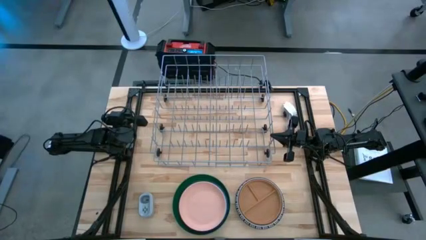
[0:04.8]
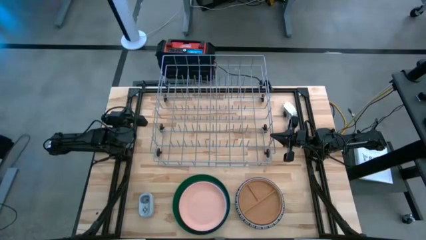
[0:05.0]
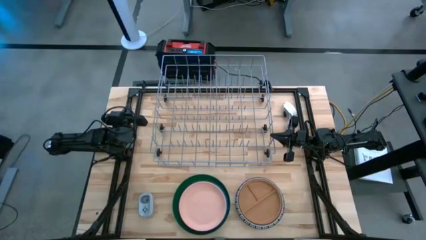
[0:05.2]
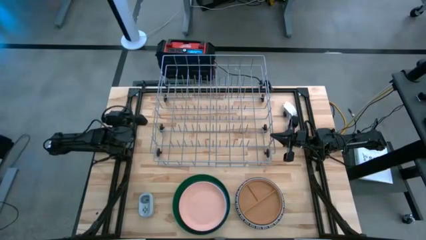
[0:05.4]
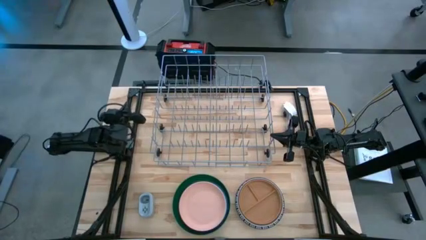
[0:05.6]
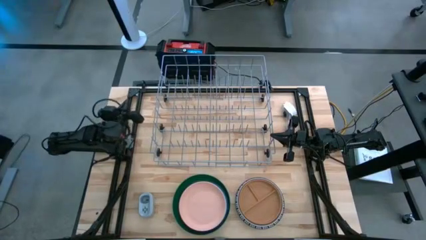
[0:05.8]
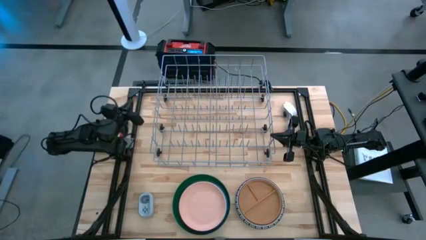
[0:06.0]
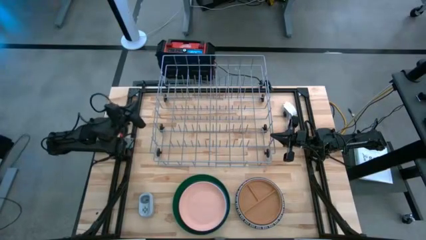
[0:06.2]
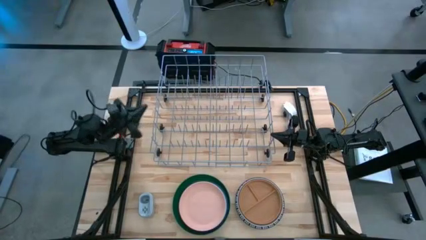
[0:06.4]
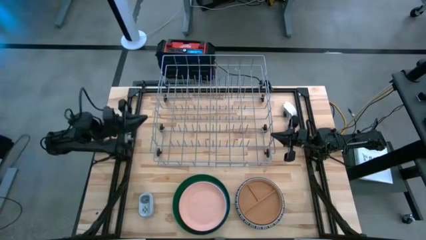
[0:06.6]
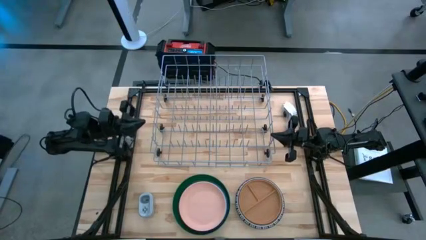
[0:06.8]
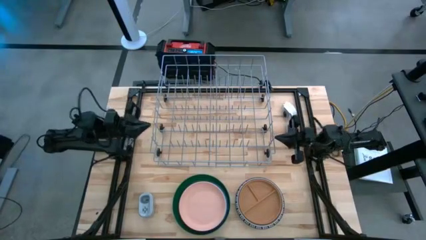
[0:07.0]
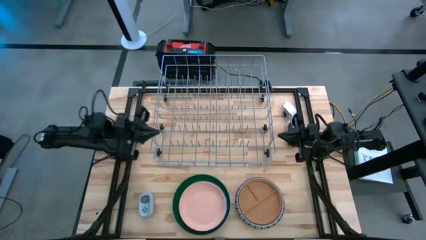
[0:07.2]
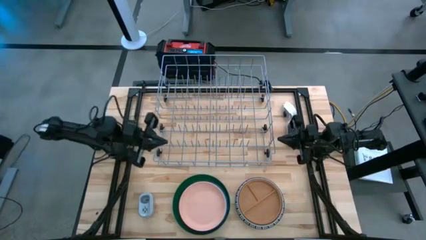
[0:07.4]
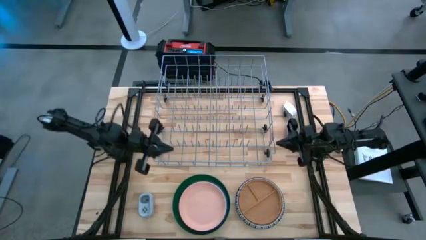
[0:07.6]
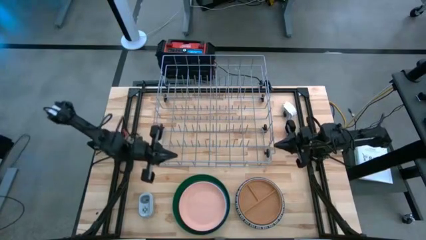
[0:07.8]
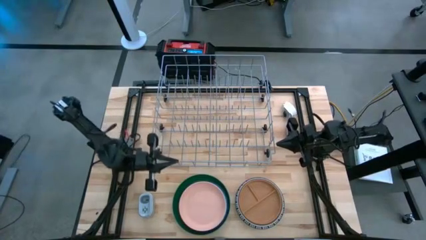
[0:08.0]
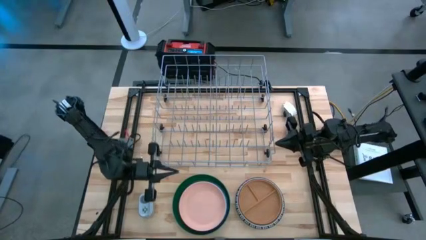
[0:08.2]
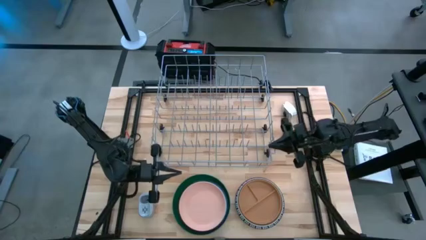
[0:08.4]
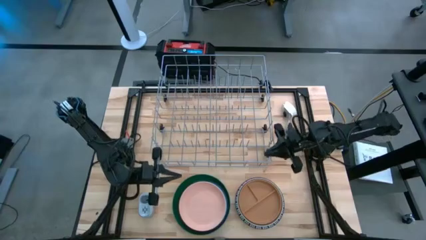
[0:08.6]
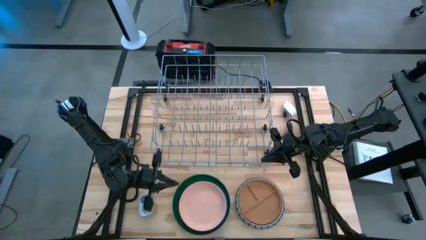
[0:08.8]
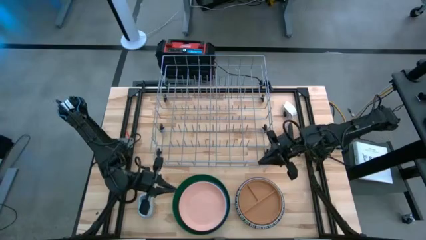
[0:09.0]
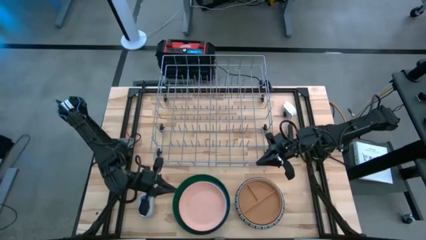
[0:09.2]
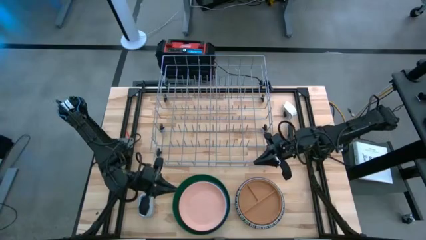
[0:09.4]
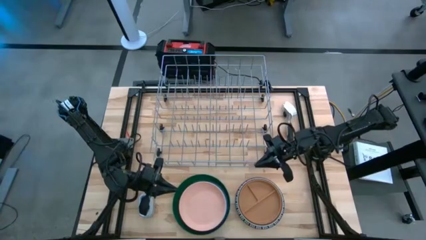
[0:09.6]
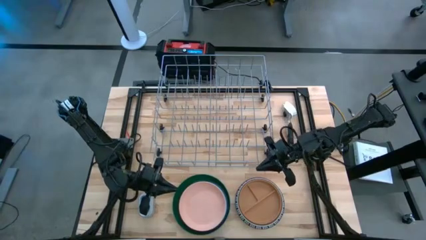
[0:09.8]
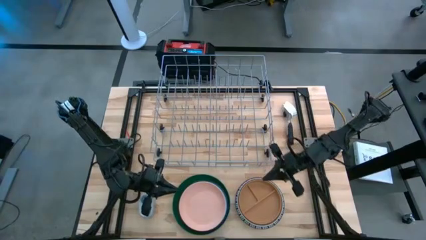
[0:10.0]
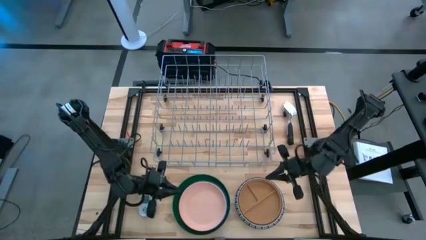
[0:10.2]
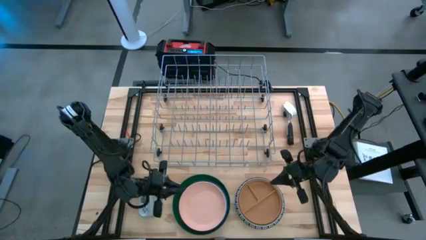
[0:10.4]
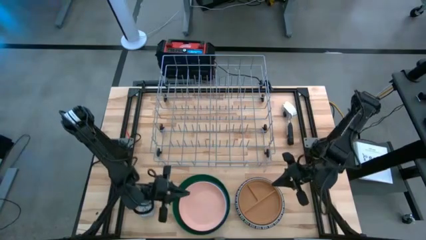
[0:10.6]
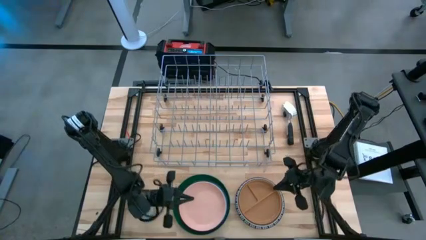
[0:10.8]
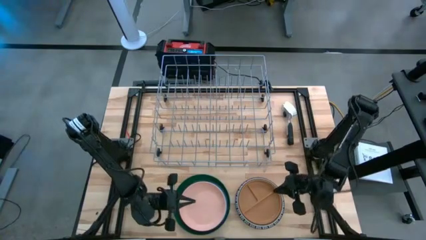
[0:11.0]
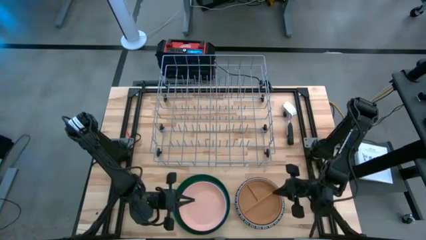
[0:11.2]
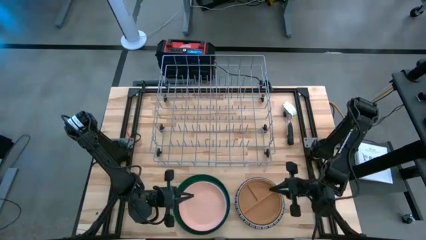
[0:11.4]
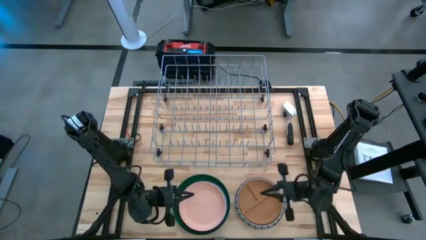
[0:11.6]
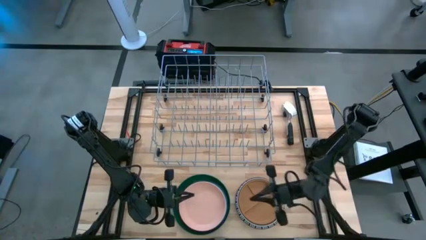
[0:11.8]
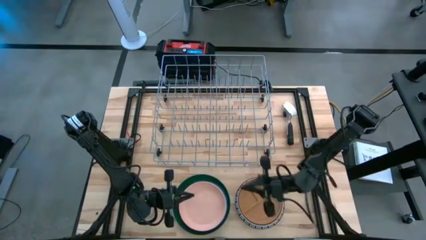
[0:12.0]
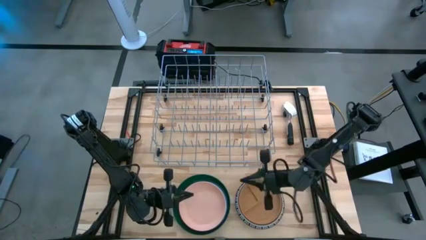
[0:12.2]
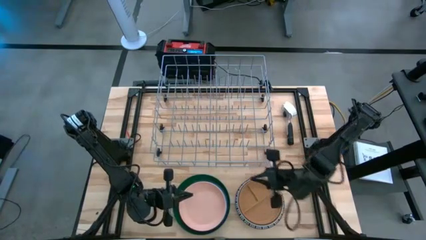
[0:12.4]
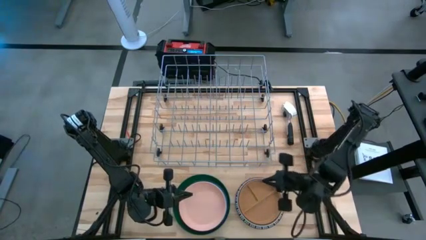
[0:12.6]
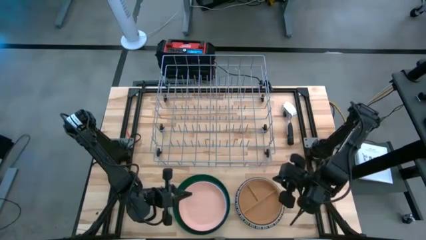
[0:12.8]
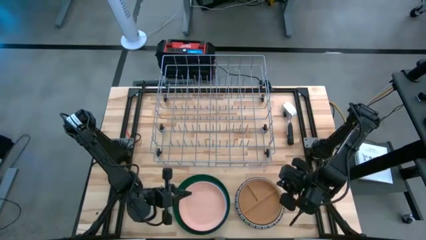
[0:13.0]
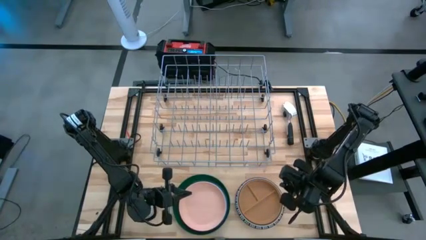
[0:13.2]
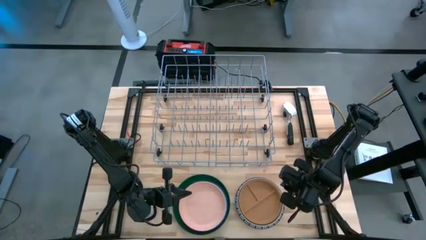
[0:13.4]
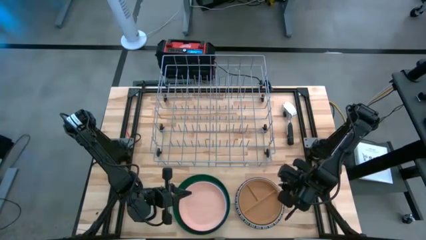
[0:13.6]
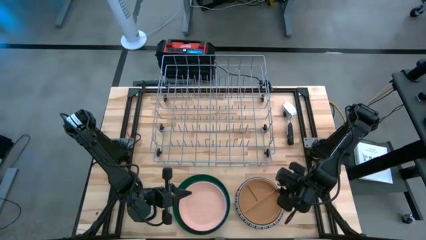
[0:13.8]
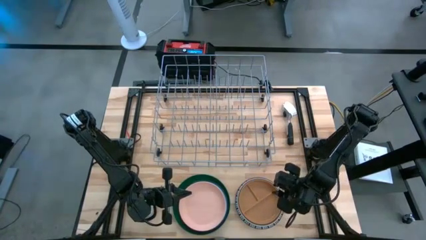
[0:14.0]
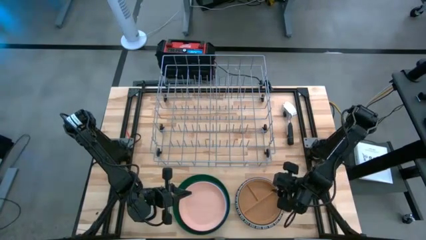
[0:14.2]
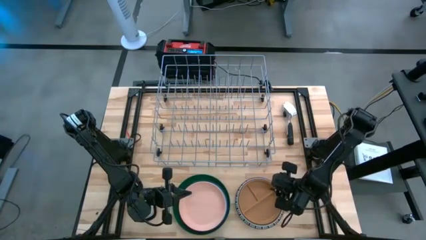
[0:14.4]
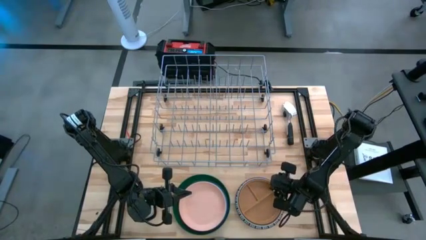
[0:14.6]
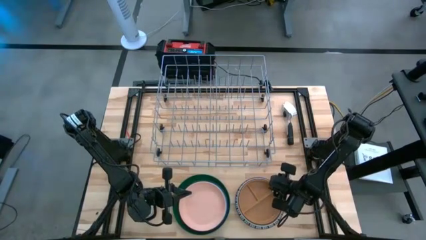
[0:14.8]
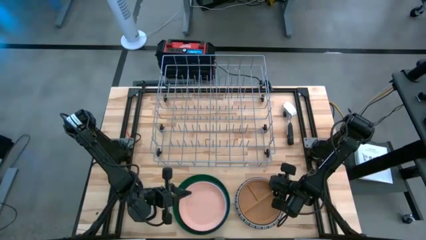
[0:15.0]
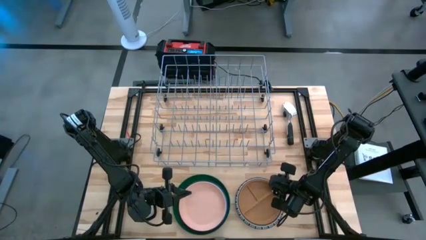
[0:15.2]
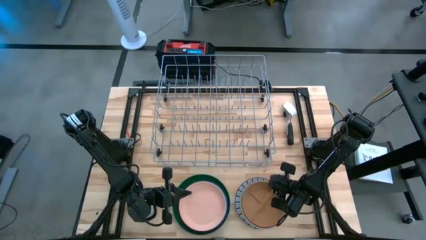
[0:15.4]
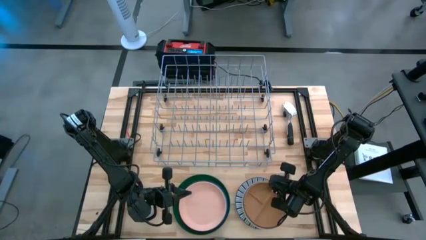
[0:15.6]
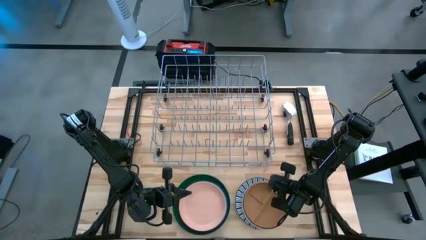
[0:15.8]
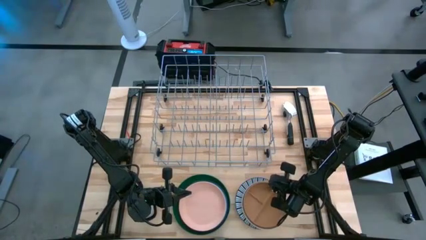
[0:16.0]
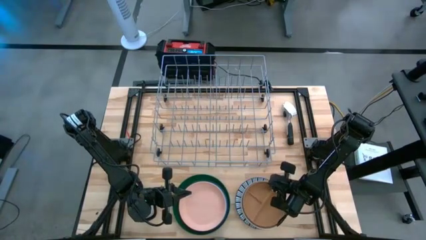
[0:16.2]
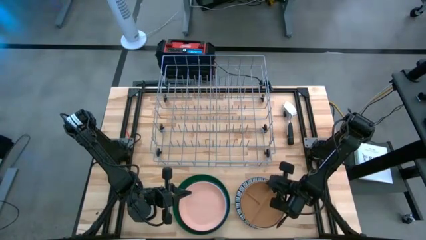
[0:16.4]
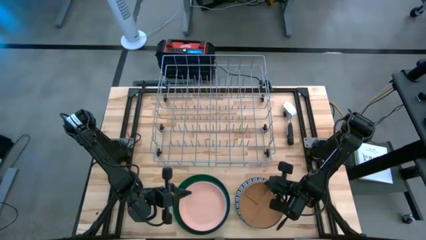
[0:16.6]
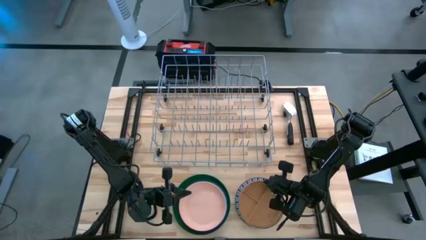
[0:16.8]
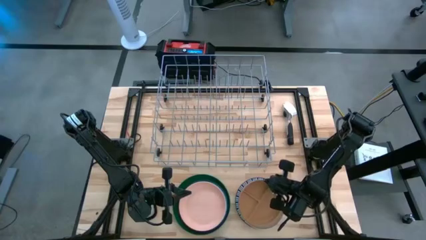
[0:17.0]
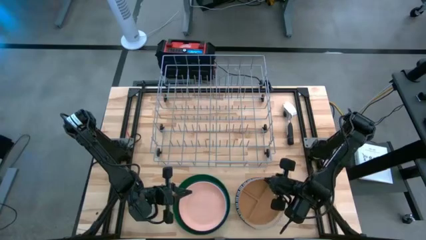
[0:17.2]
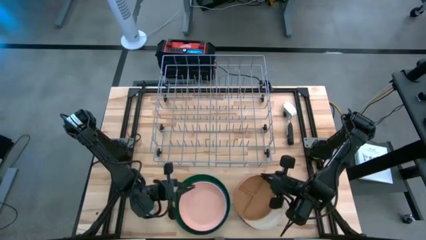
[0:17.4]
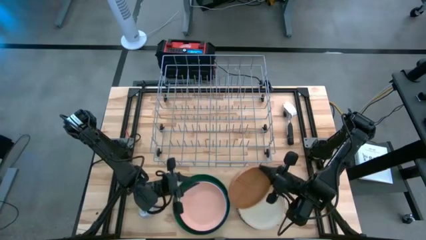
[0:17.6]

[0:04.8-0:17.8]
Task: Sort dishes
Put the brown plate into the dish rack
